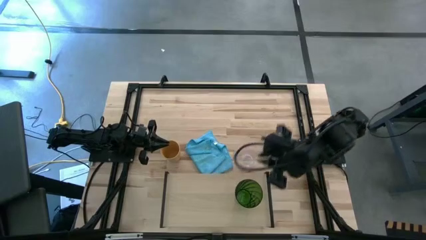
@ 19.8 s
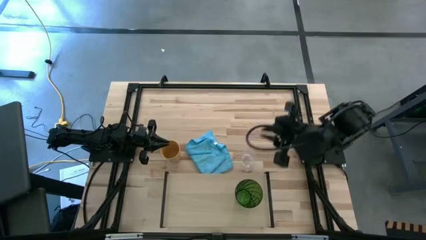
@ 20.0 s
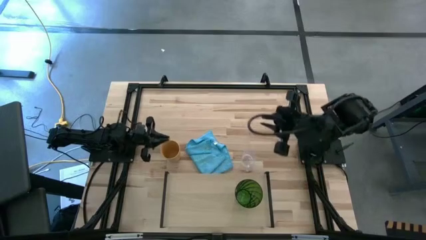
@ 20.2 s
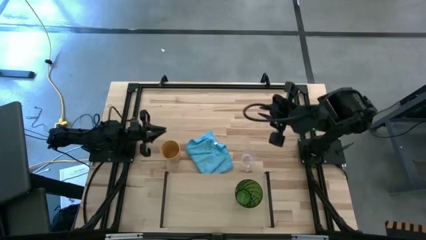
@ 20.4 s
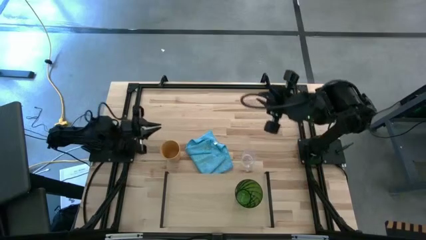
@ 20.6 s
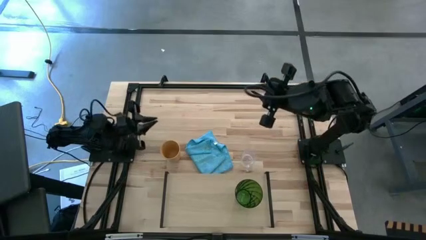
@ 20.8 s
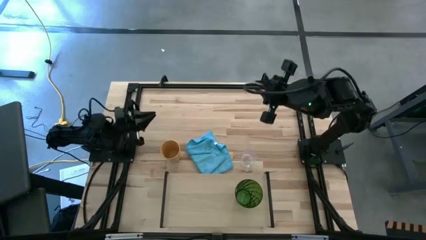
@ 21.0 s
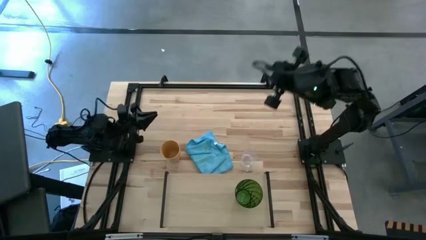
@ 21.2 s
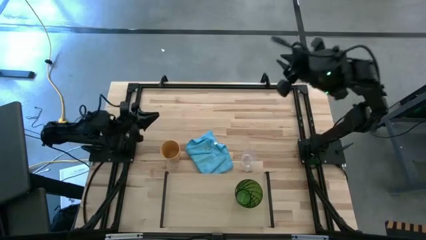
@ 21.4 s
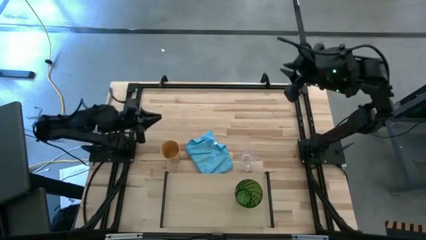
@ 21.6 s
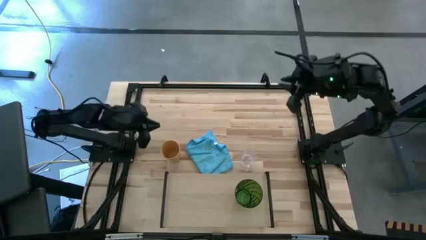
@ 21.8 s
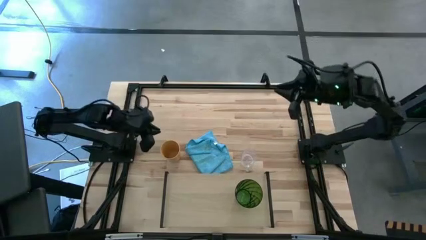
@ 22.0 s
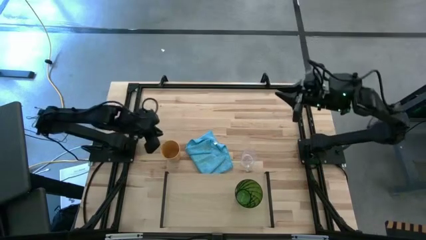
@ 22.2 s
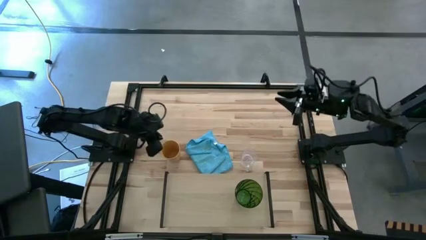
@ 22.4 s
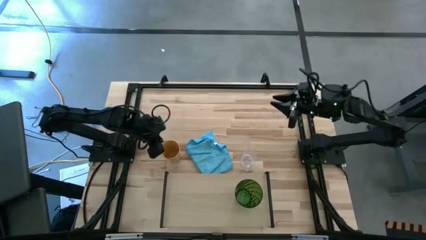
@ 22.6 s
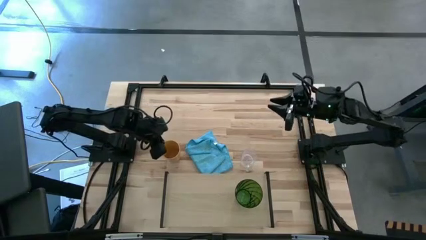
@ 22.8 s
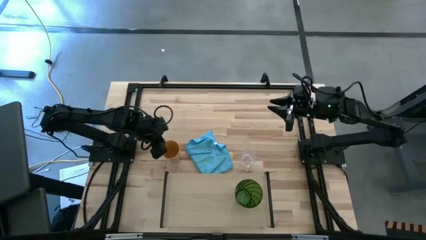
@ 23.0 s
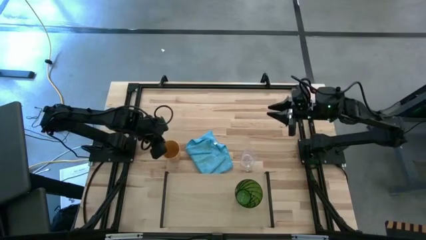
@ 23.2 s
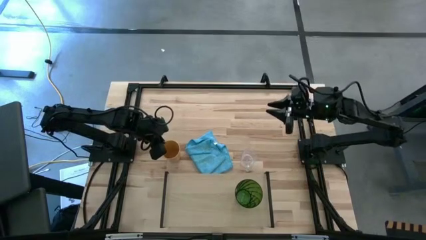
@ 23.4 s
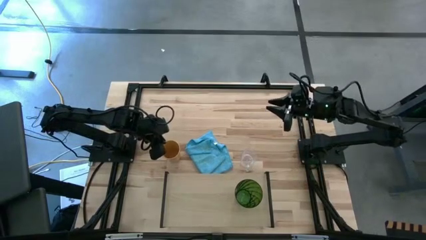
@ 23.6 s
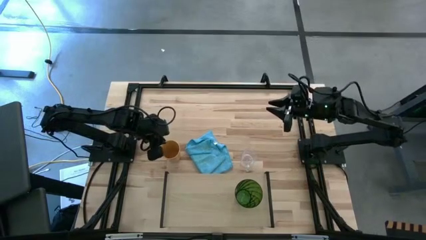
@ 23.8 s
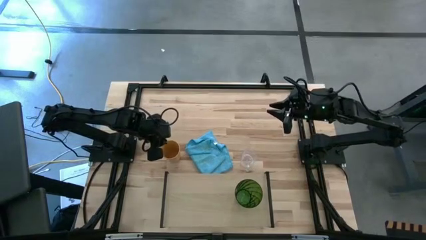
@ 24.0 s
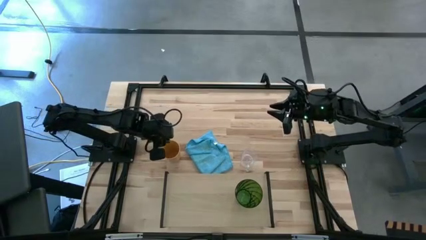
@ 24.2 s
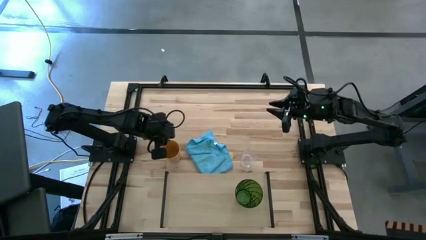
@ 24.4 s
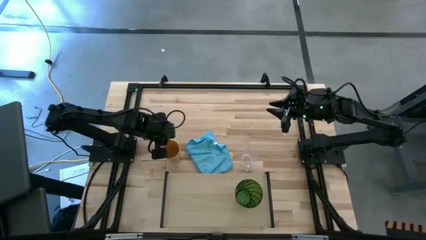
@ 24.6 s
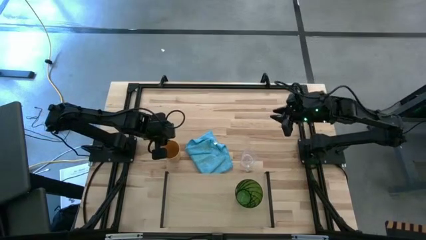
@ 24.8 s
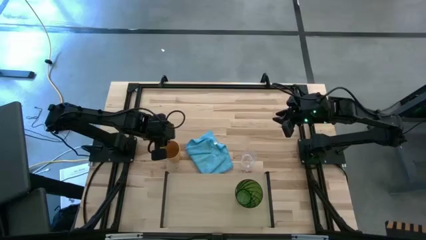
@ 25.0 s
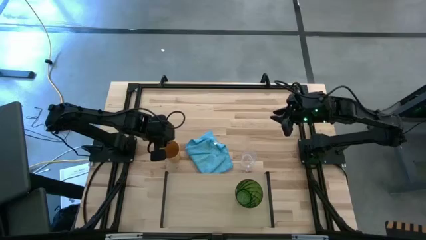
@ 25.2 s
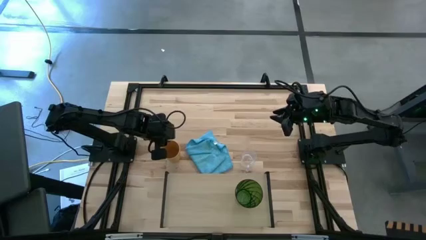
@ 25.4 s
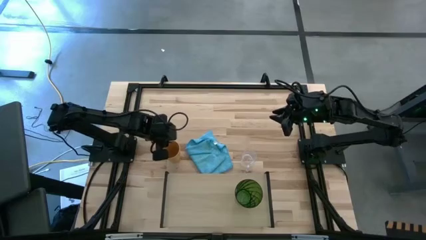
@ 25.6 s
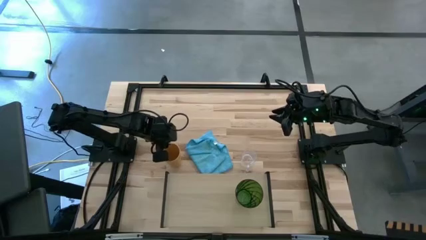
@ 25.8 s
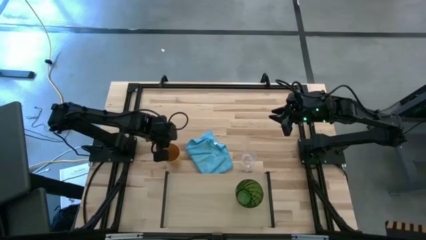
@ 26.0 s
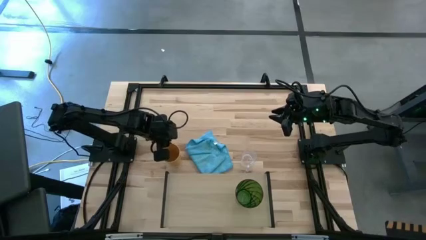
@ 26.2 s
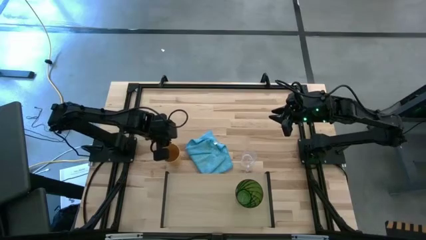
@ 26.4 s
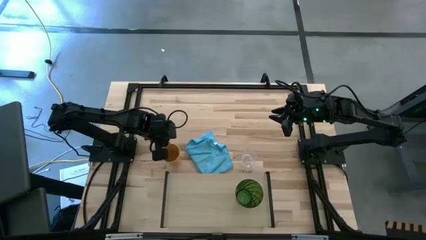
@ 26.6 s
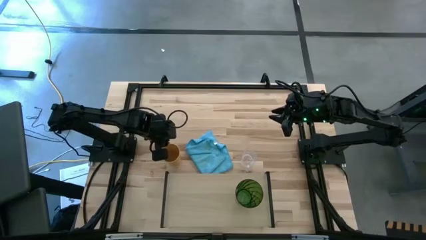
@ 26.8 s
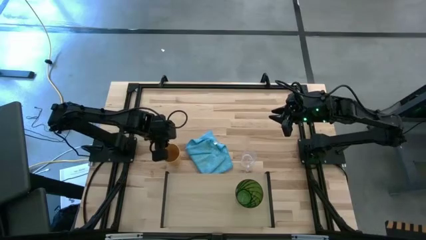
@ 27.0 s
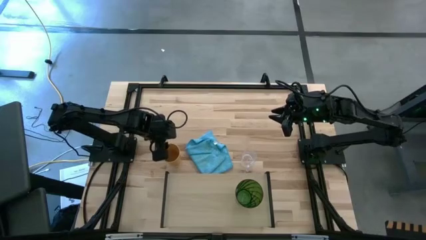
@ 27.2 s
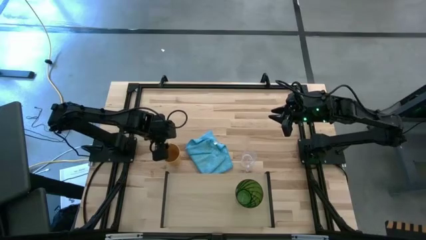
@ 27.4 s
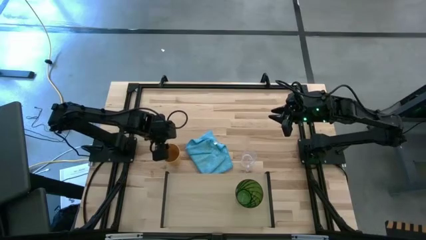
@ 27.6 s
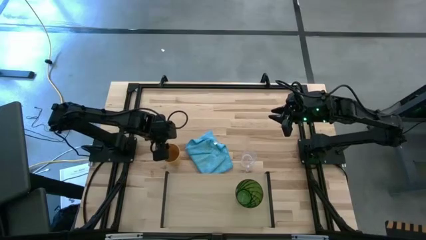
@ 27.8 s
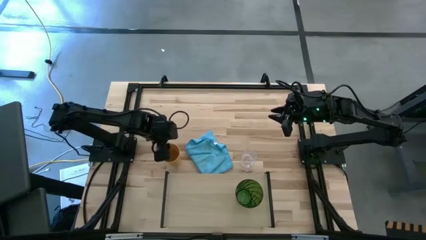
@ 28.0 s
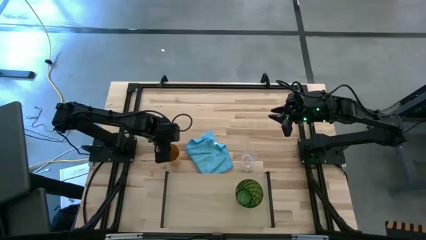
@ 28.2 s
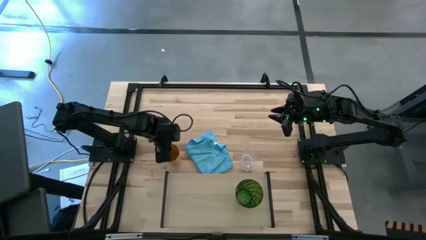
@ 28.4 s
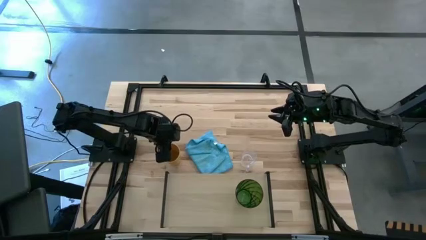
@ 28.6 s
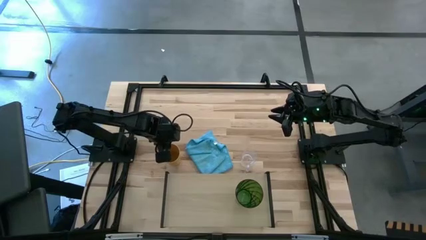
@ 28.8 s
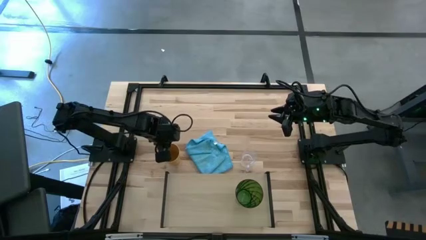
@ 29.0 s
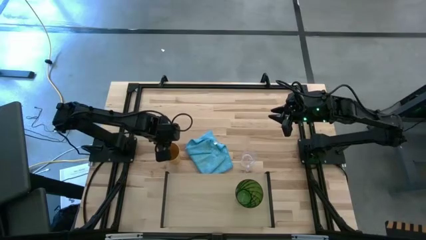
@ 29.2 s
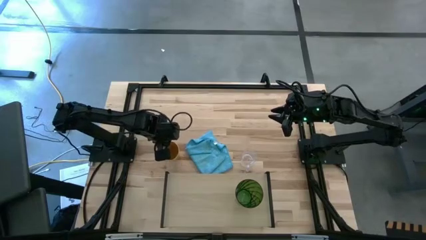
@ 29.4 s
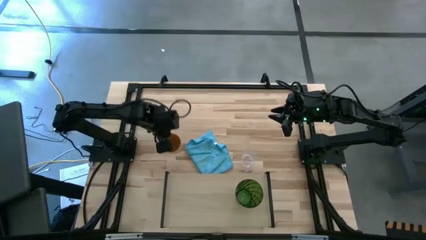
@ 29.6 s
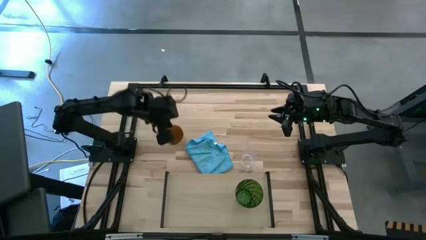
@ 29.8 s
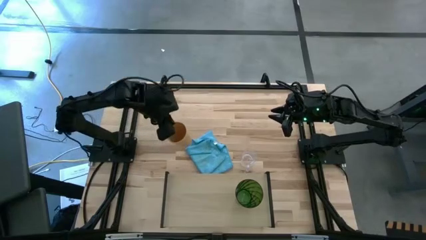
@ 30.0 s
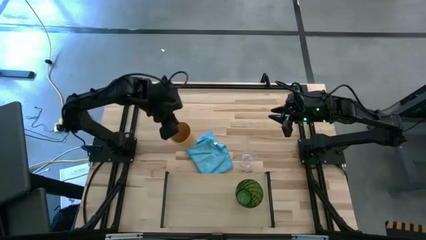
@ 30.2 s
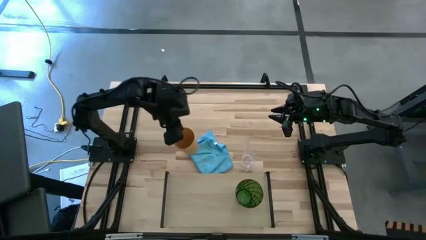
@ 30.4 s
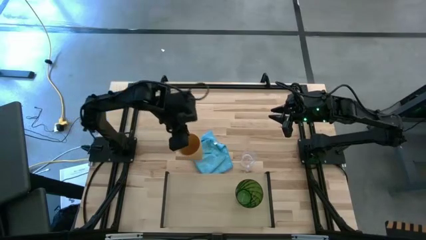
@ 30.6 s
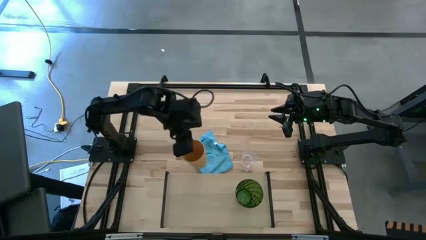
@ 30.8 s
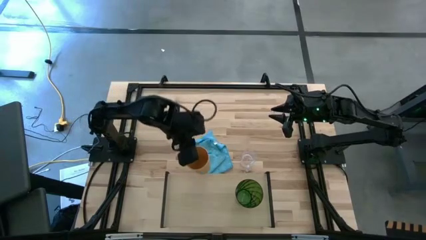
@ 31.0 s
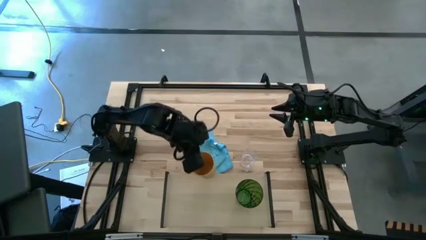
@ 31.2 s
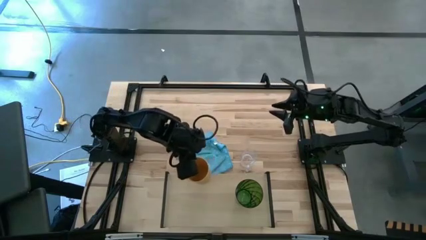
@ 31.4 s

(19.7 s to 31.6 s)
Task: Stack small to large cups/mugs on shelf
Put the yellow cup on the shelf

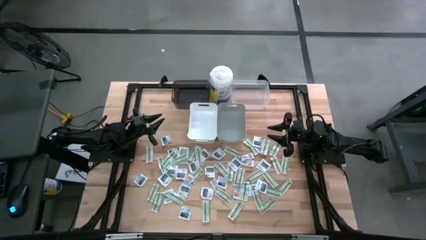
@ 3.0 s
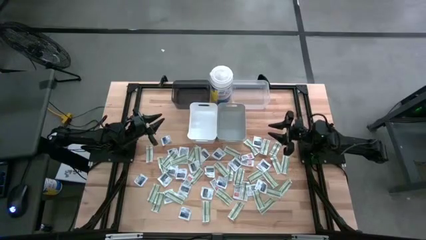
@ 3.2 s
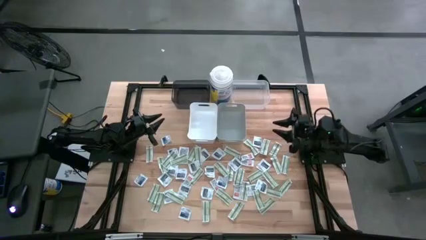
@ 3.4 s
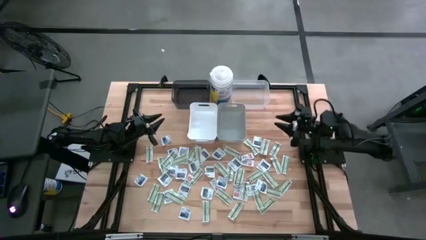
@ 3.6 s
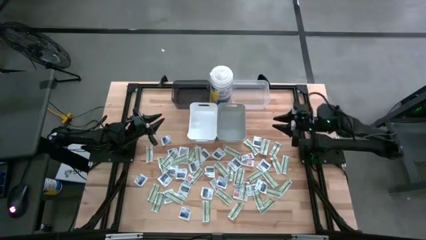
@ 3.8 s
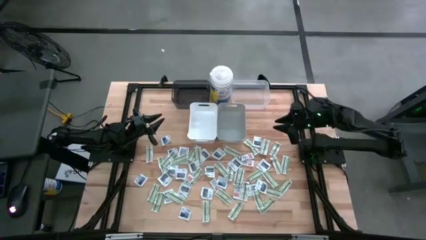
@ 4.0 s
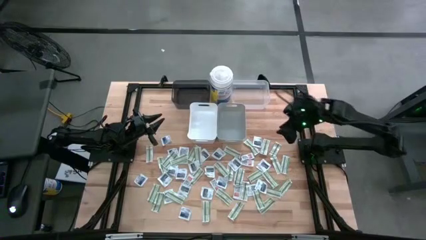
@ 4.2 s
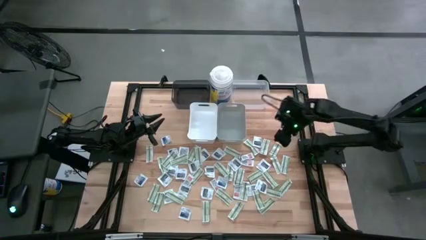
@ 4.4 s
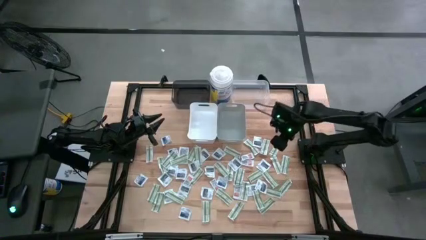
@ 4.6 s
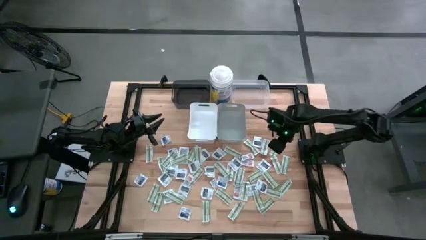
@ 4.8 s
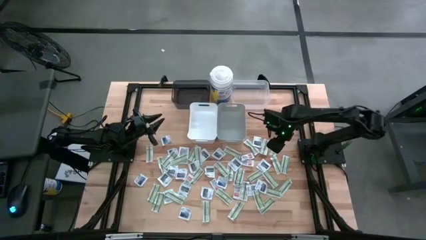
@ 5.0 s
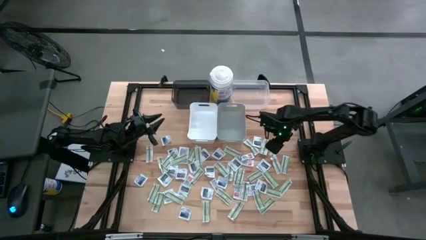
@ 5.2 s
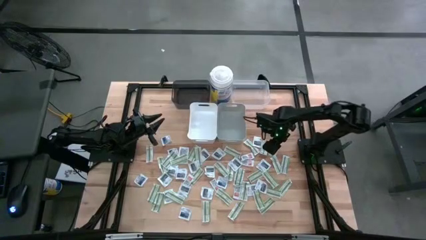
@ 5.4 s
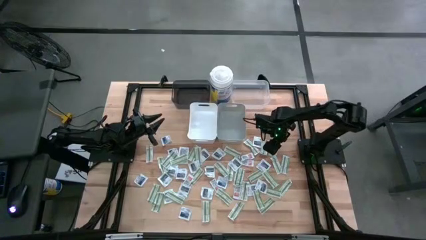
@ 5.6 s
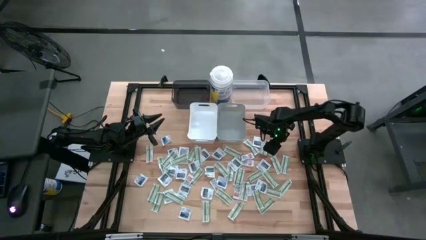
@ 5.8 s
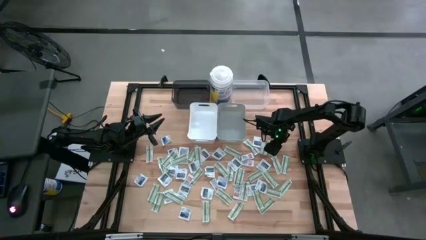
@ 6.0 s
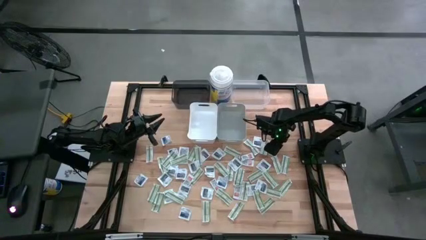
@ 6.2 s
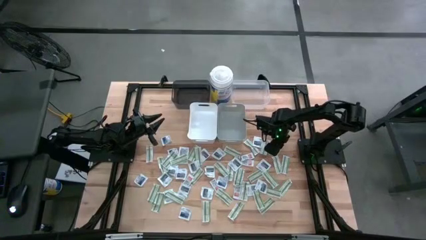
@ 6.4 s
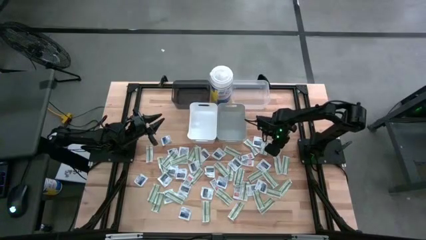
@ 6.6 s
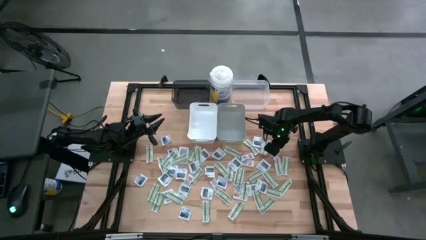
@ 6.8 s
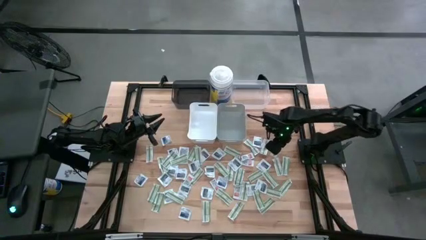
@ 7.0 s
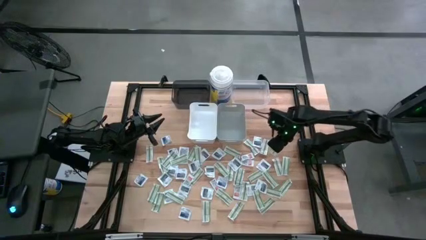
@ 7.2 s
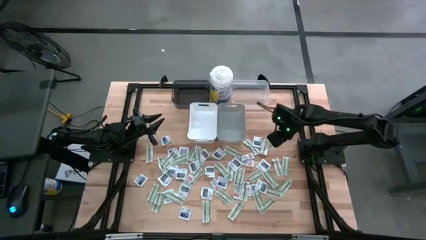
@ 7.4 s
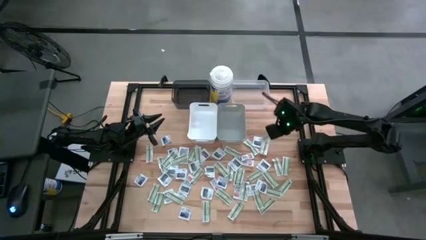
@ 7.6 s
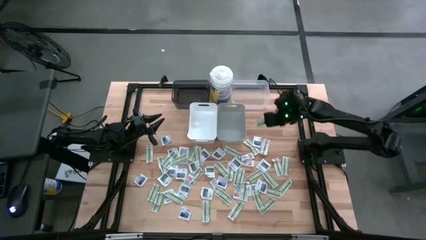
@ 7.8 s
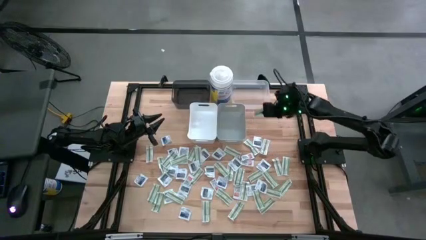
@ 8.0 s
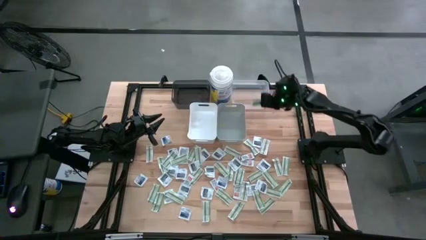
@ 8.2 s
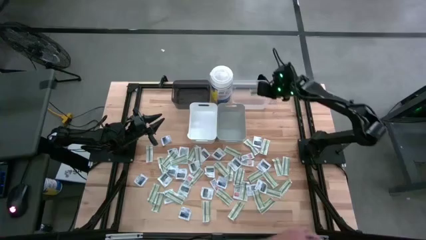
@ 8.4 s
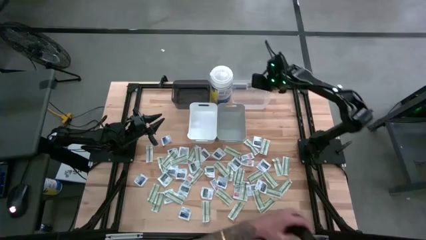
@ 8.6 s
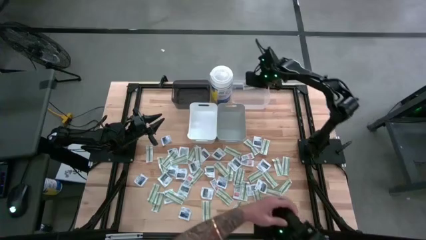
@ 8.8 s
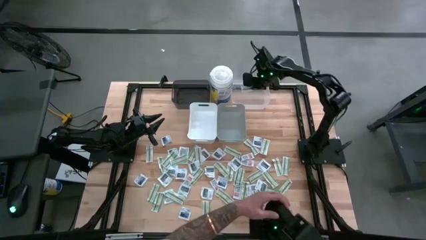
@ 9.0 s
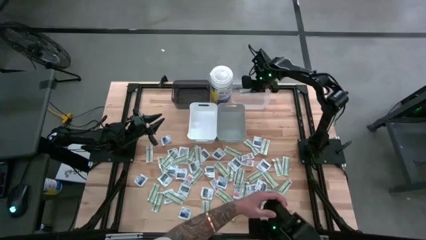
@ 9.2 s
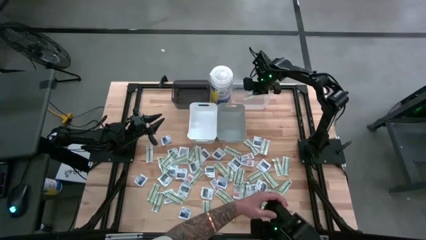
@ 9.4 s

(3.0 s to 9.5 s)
Task: Pick & Place First Aid Supplies
Put the band aid into the transparent bin
